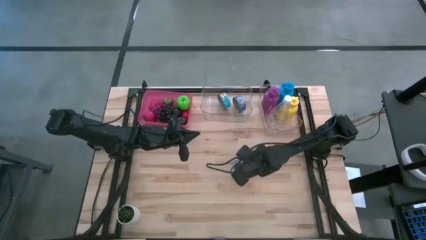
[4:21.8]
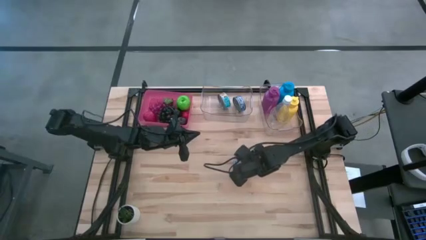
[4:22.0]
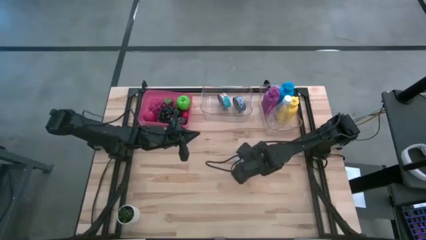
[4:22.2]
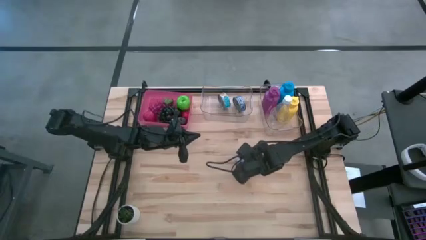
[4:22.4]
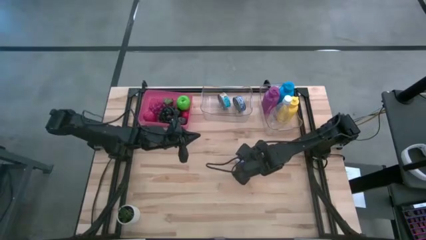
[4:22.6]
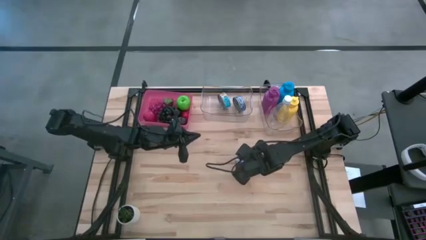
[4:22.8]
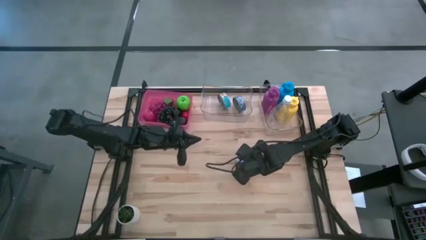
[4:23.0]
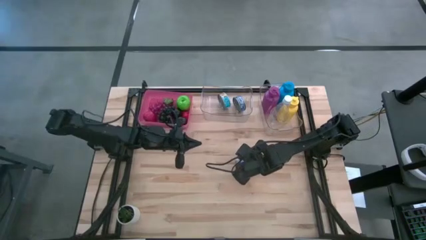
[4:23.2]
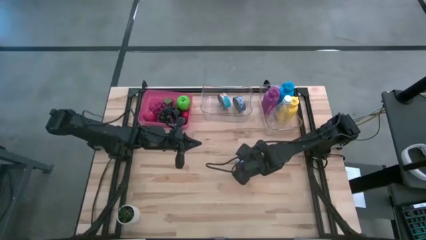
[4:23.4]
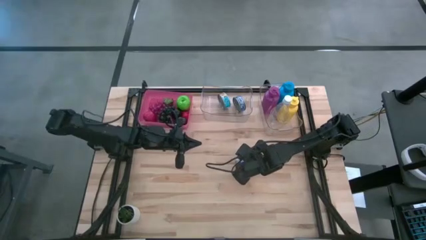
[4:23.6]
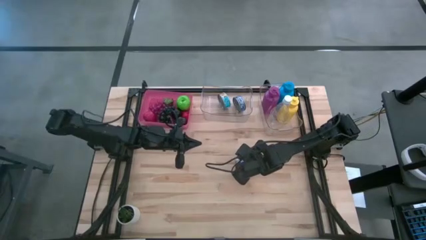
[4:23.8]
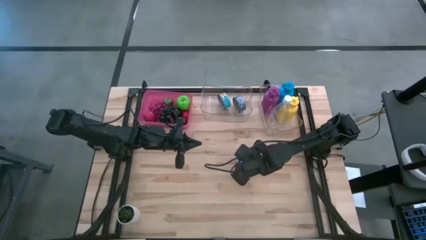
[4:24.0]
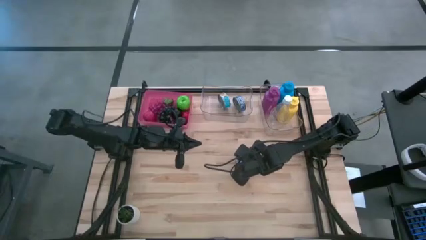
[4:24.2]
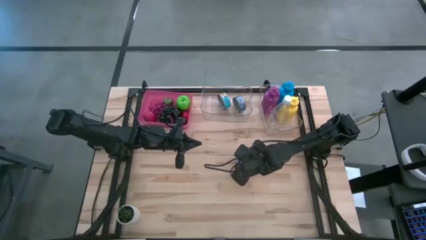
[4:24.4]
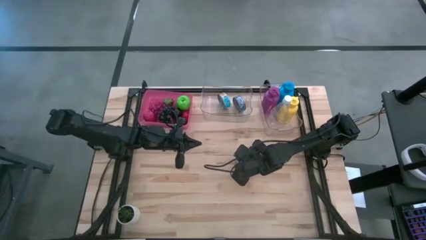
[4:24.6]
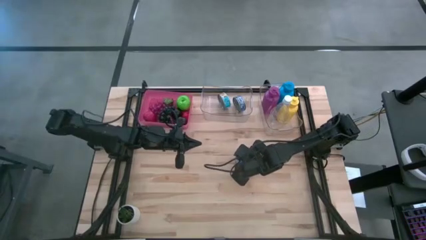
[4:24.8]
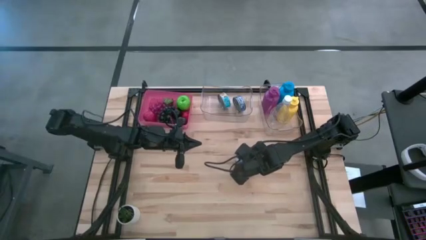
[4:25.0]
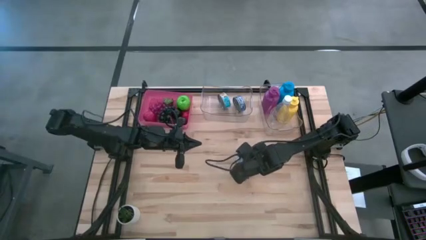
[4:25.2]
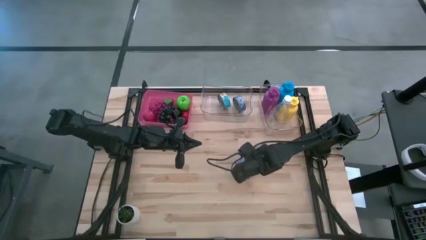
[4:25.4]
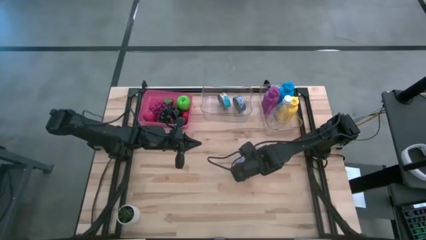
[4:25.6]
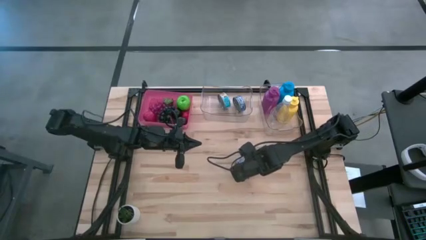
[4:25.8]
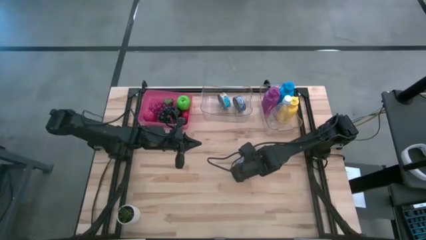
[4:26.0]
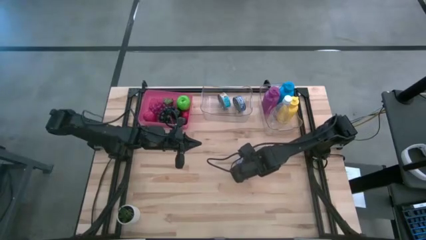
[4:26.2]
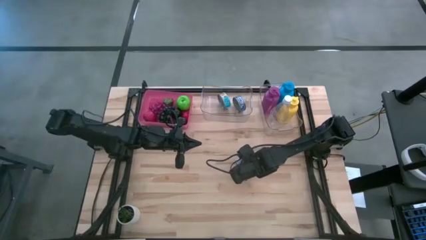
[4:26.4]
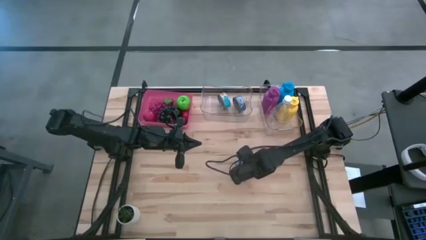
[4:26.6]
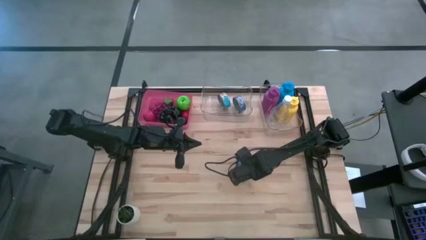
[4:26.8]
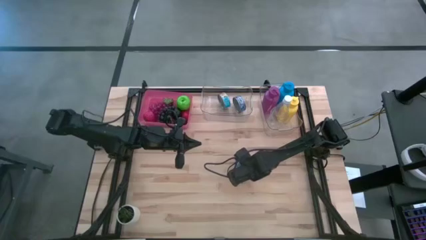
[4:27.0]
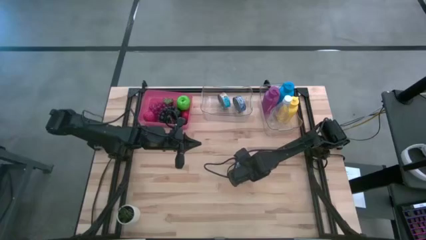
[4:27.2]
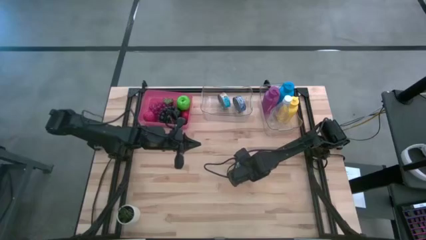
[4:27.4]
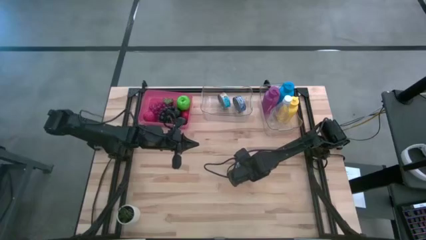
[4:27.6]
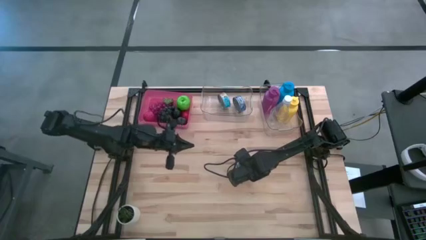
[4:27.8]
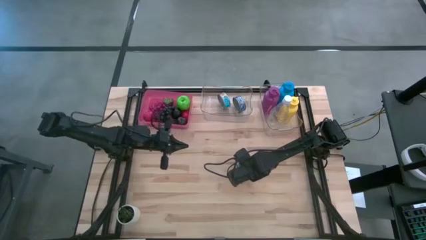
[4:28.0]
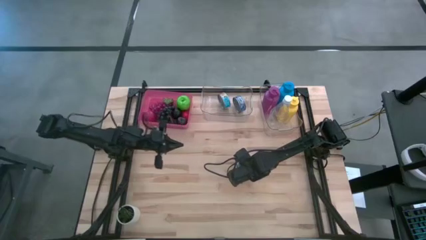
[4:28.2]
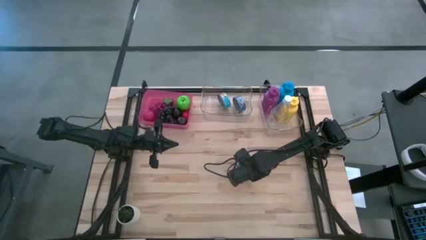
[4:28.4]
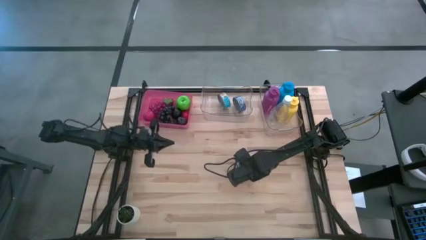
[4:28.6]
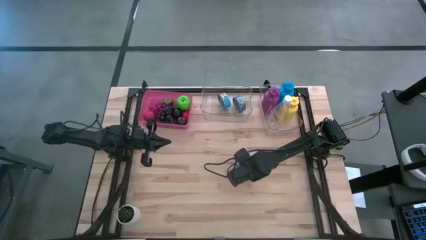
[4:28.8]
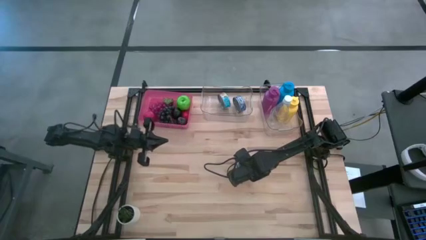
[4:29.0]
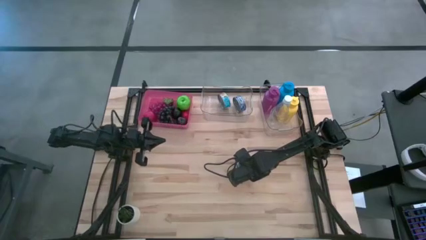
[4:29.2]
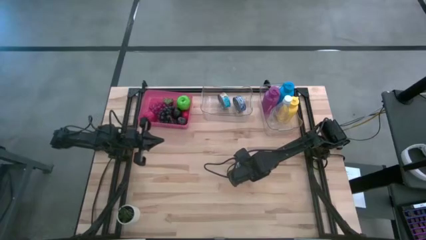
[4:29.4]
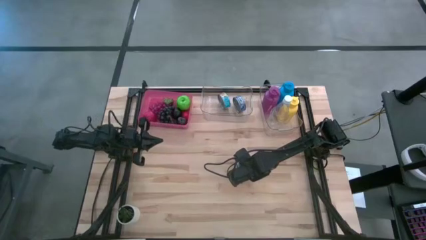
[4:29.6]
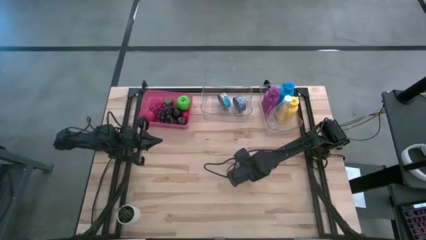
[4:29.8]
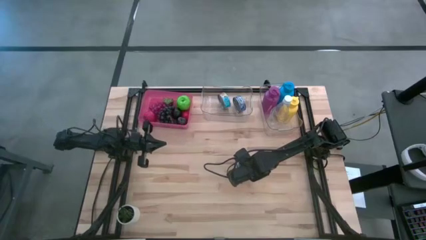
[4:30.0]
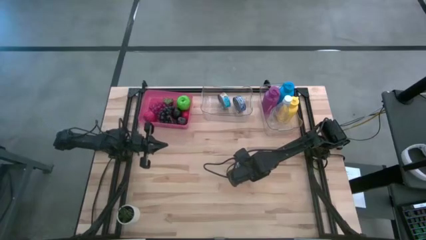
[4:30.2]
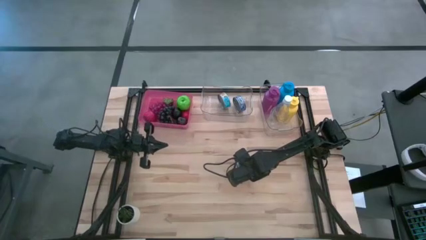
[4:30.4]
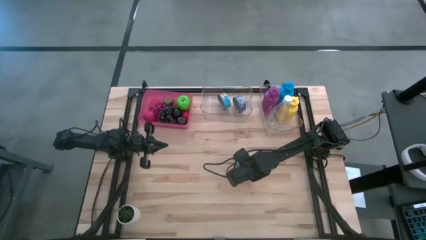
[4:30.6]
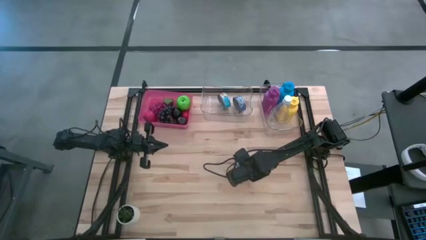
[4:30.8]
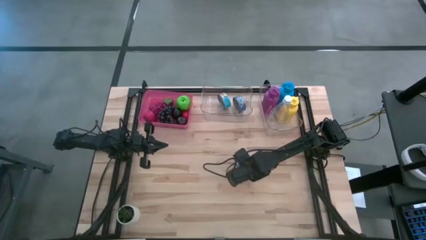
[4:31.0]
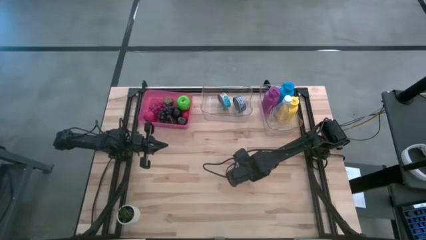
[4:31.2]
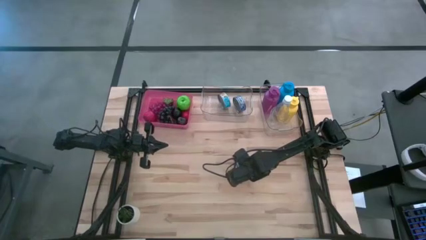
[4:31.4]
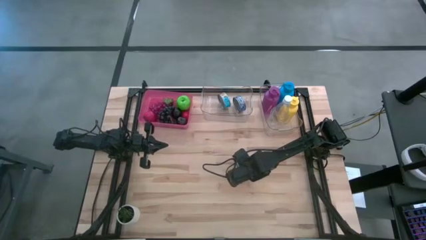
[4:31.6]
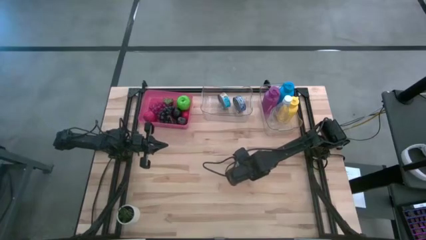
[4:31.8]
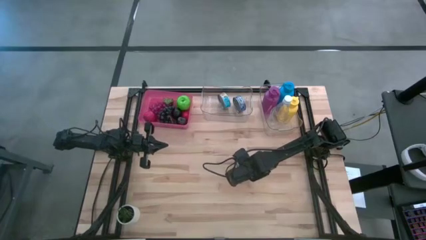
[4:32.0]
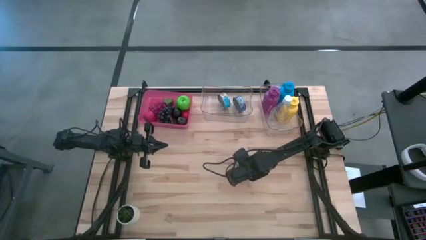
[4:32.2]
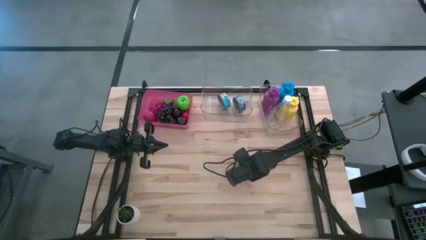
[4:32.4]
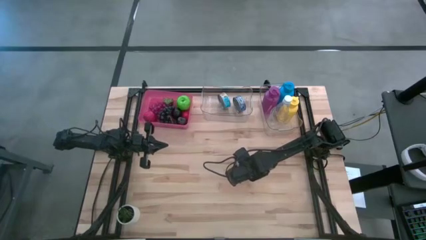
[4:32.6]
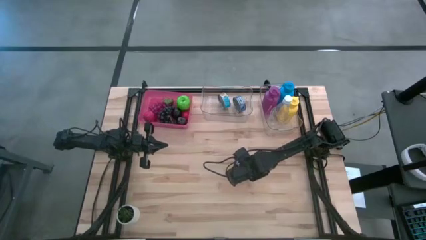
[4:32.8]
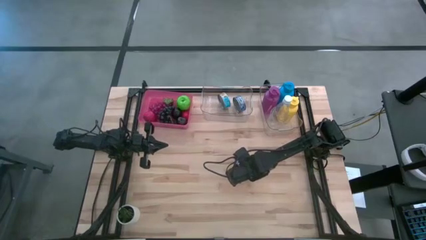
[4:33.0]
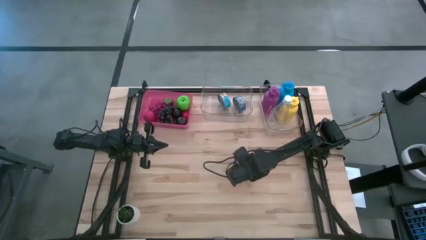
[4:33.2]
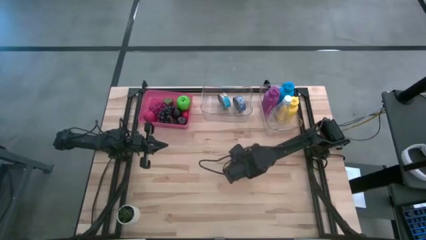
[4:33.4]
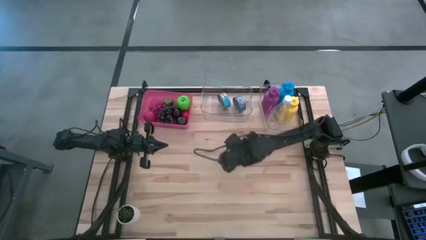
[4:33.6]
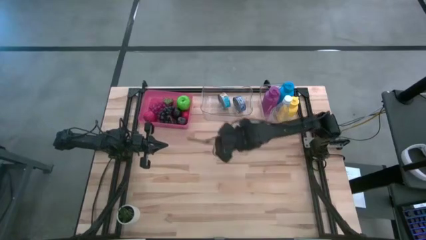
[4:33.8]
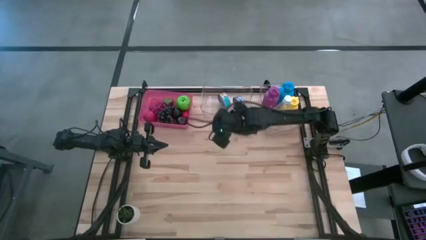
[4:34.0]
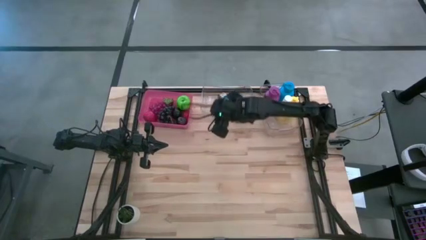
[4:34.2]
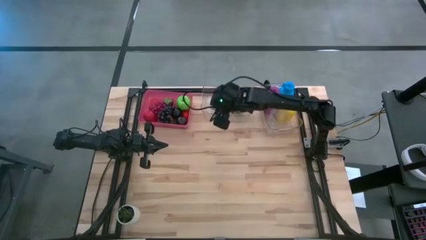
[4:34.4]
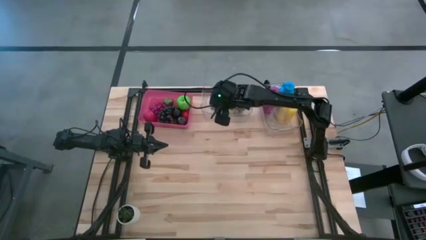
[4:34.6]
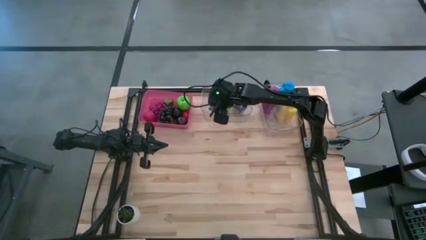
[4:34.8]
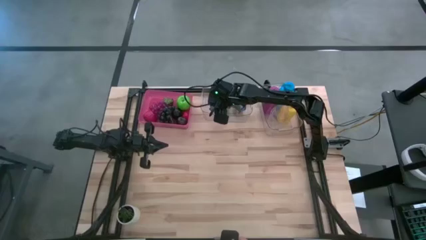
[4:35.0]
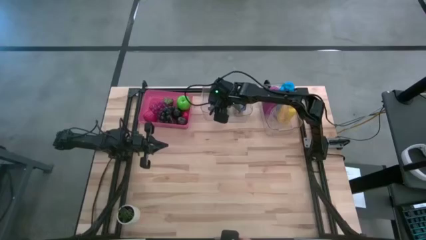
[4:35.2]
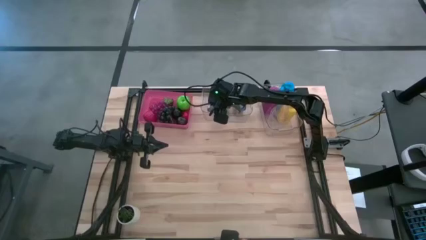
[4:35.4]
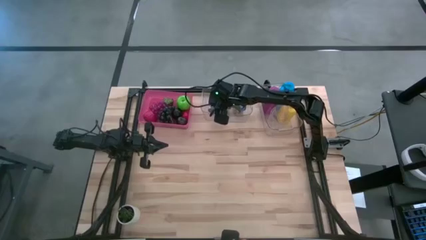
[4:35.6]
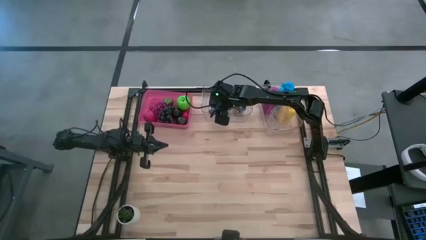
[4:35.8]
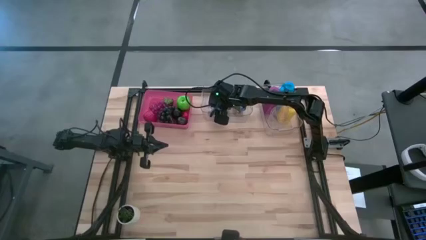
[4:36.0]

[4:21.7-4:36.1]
Task: Pick & Place Food Item
Put the blue pink tuna can into the left transparent bin

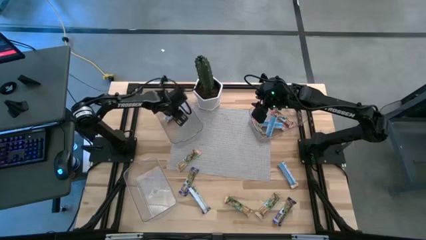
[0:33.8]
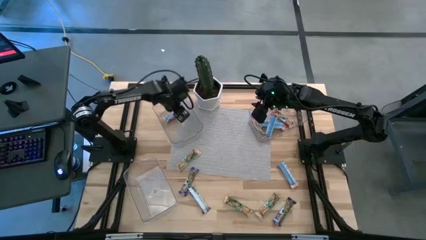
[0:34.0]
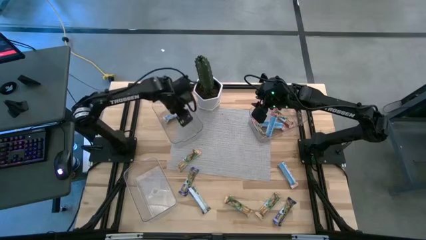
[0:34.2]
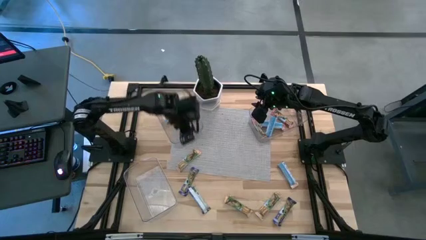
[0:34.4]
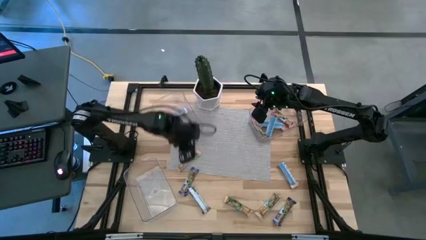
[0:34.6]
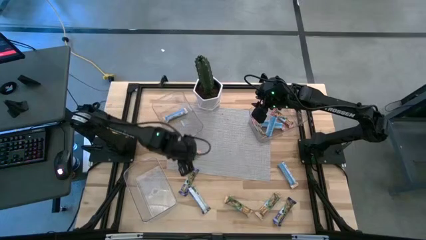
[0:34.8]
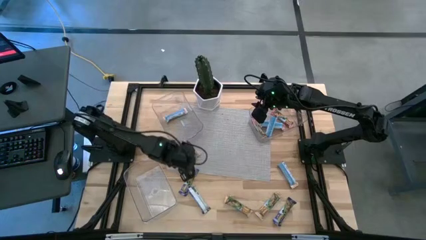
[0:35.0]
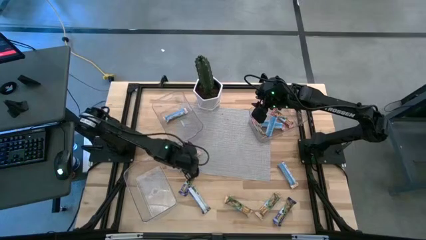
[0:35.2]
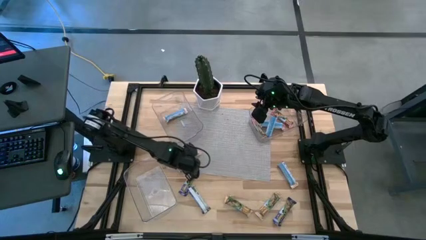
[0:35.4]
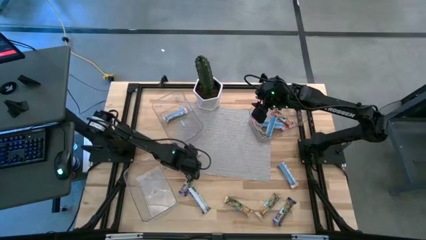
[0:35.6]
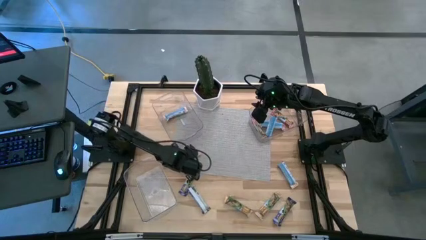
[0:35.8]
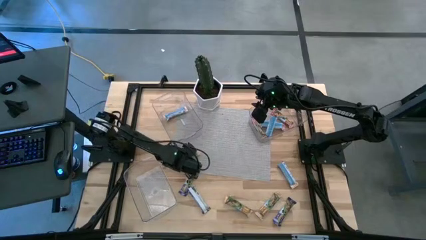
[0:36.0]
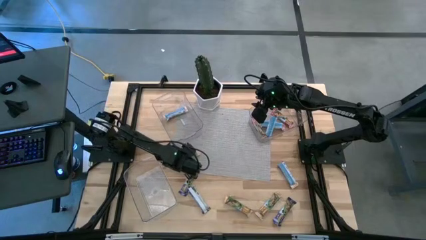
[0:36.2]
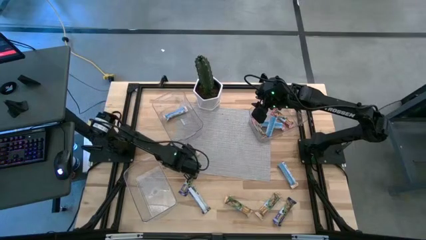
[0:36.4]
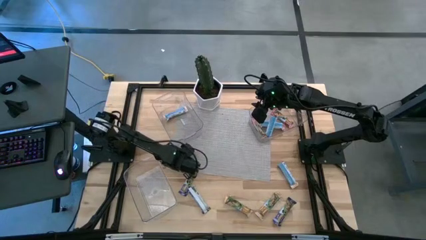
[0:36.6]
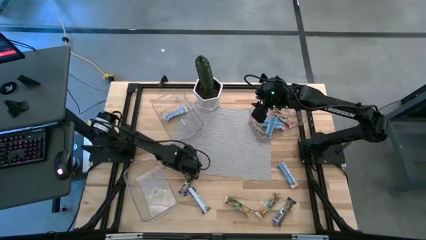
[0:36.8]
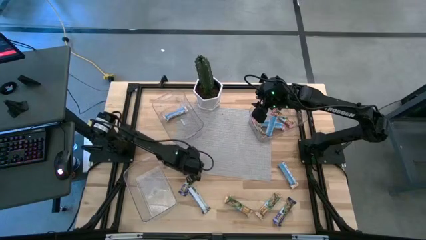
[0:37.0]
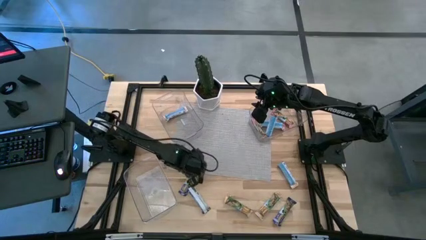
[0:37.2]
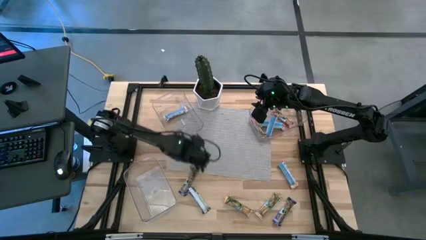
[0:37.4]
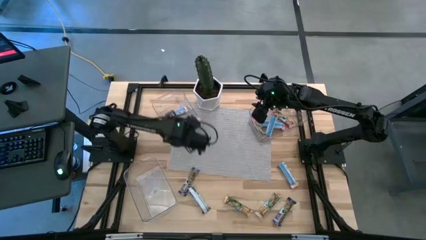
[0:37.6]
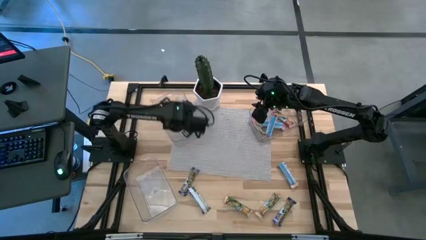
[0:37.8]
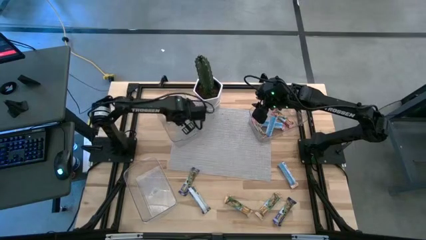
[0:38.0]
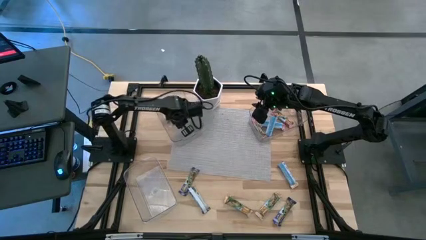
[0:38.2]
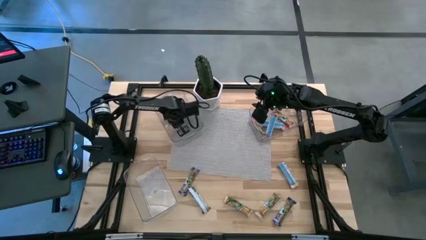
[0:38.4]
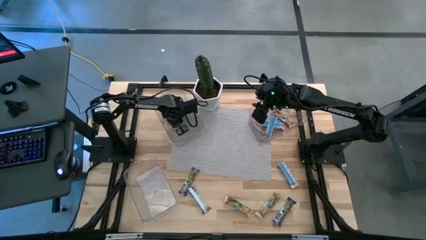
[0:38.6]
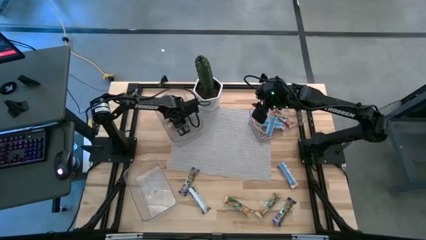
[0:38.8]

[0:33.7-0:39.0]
Task: Pick and place Granola Bars by type
Put the yellow granola bar into the top left transparent bin
